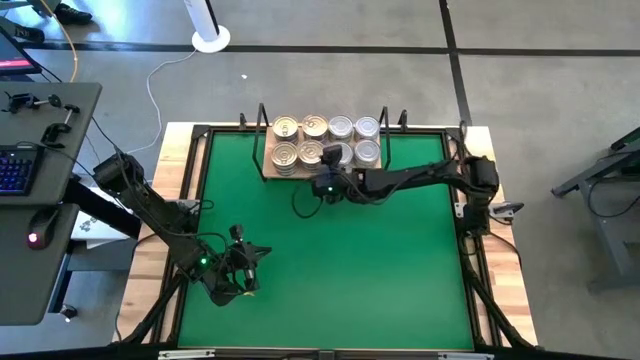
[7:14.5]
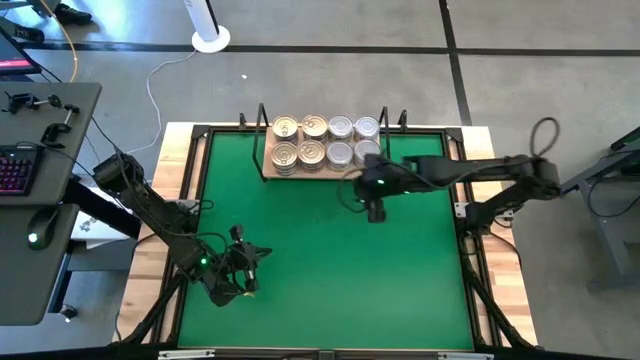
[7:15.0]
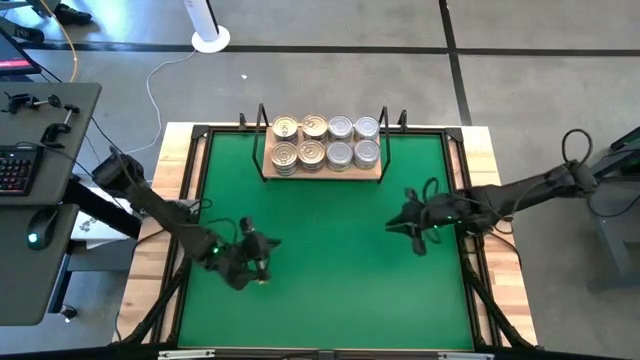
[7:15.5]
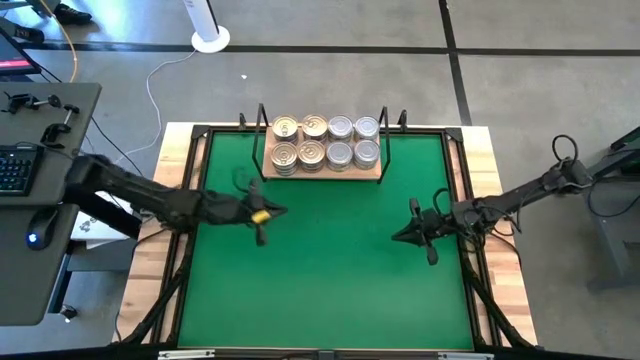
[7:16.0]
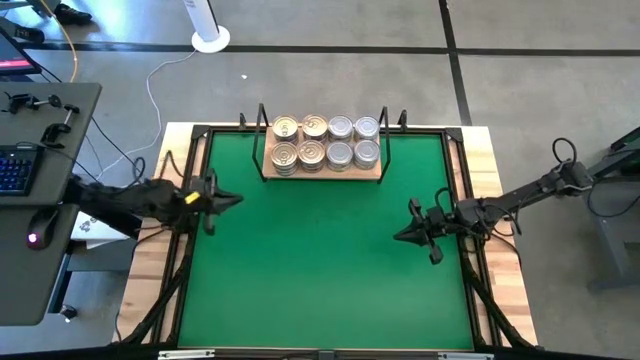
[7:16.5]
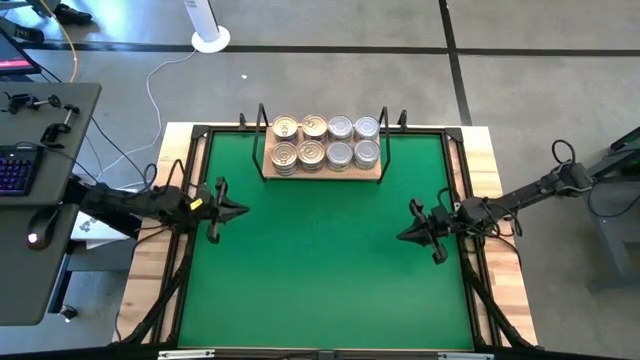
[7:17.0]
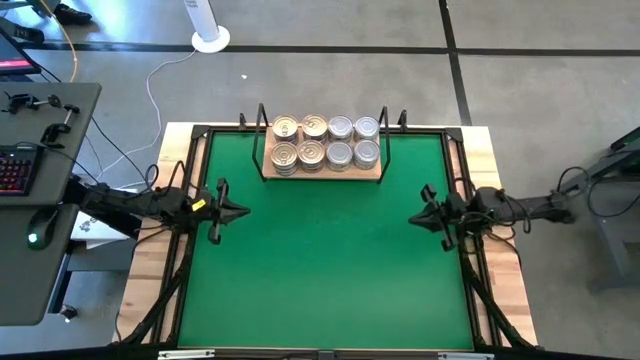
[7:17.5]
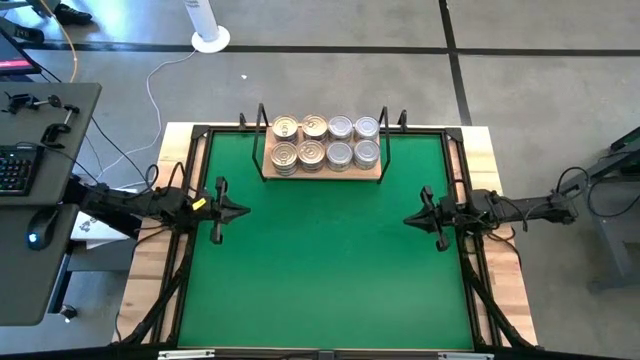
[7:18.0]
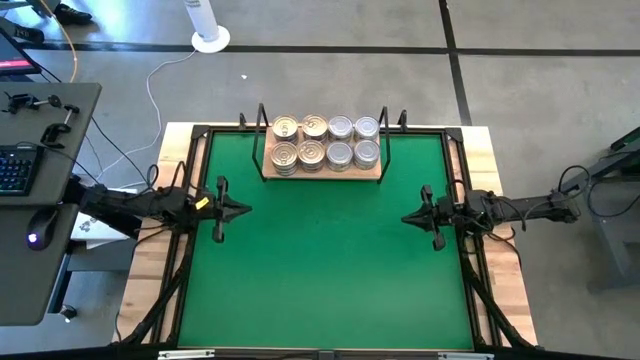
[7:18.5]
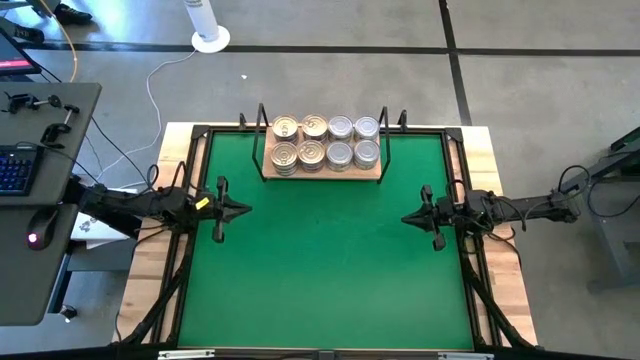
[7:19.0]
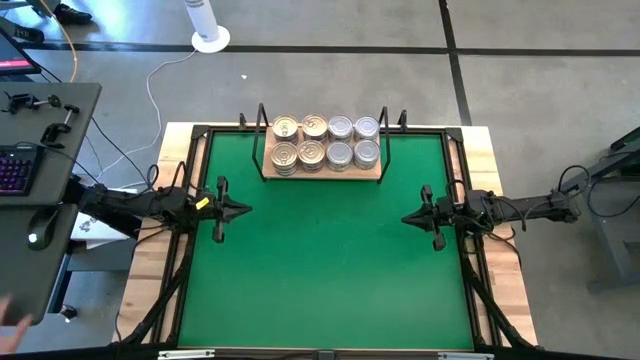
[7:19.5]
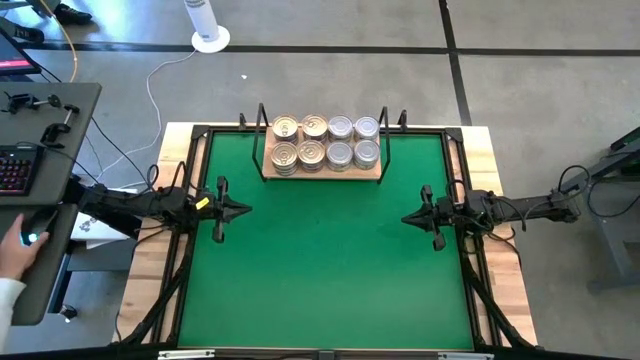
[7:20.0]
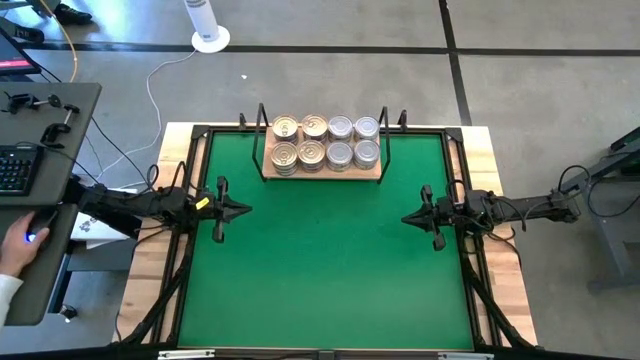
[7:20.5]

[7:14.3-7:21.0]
Task: Stack canned seafood by type on shelf
Return to Home Position

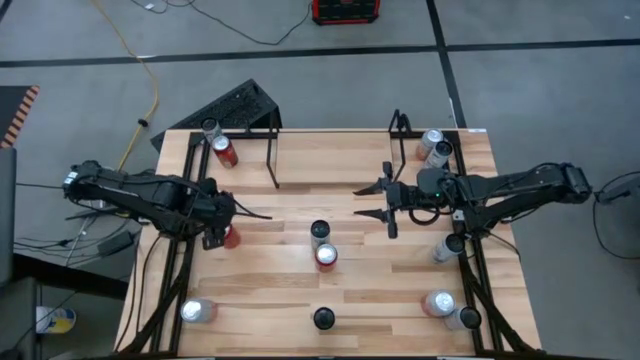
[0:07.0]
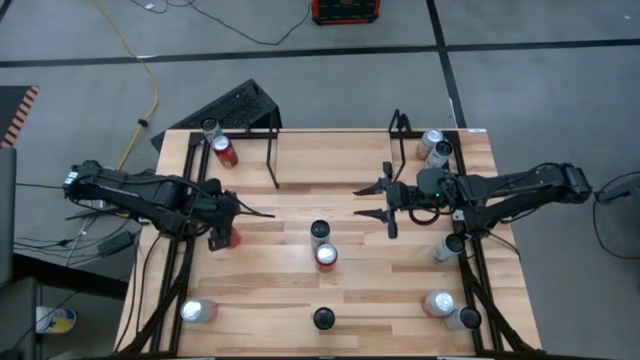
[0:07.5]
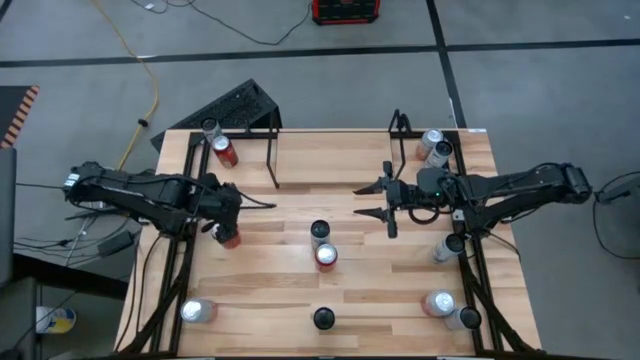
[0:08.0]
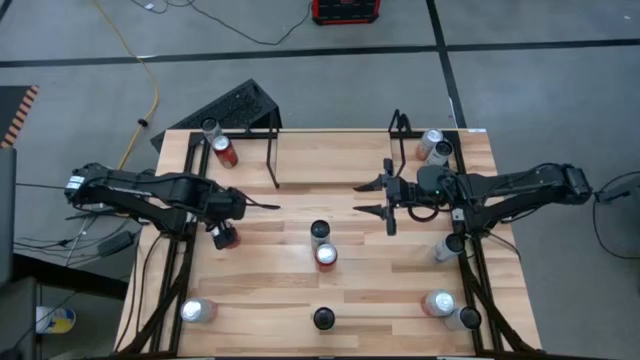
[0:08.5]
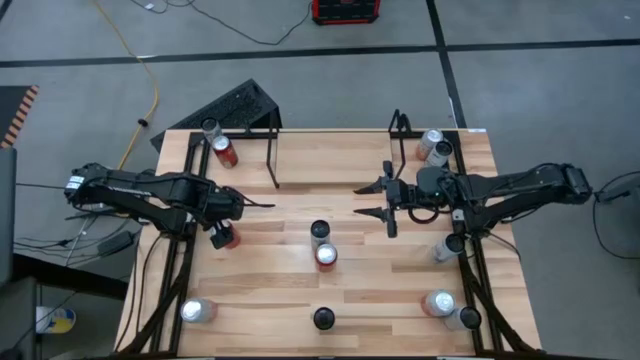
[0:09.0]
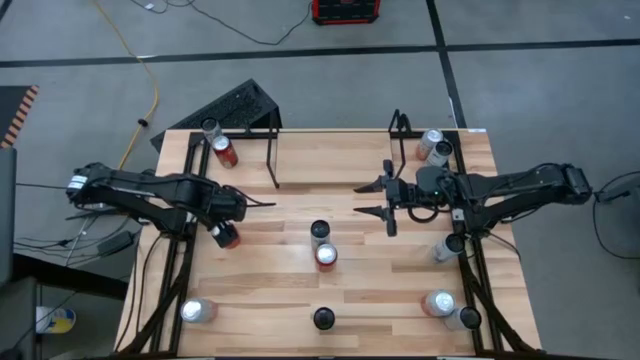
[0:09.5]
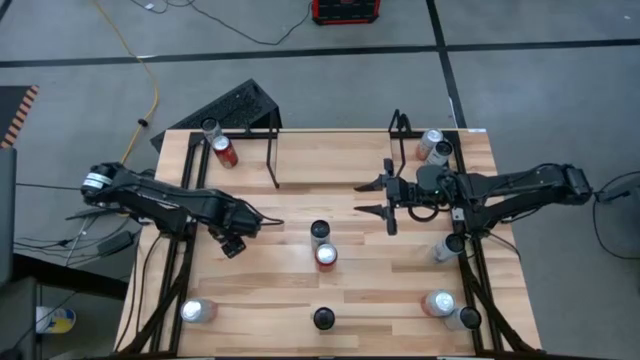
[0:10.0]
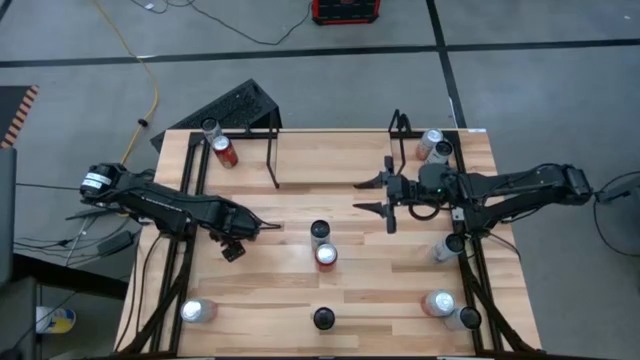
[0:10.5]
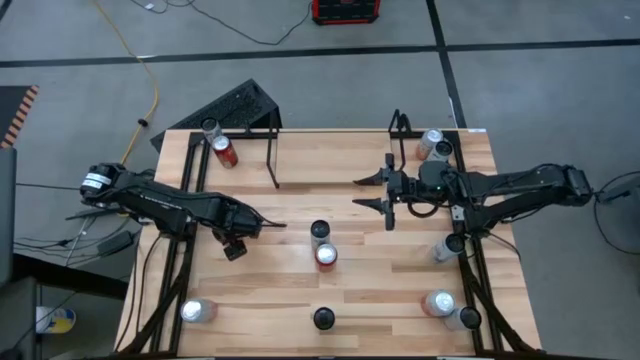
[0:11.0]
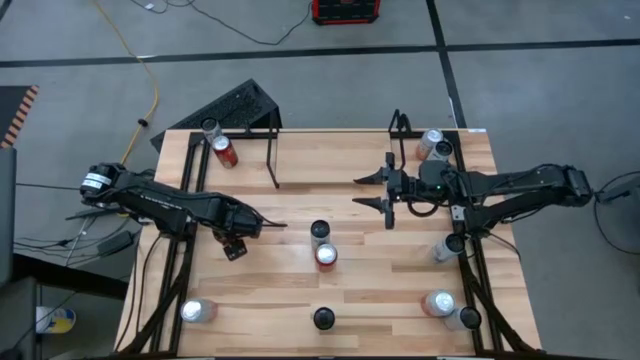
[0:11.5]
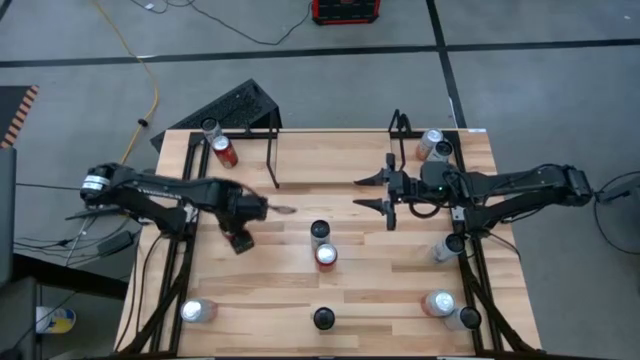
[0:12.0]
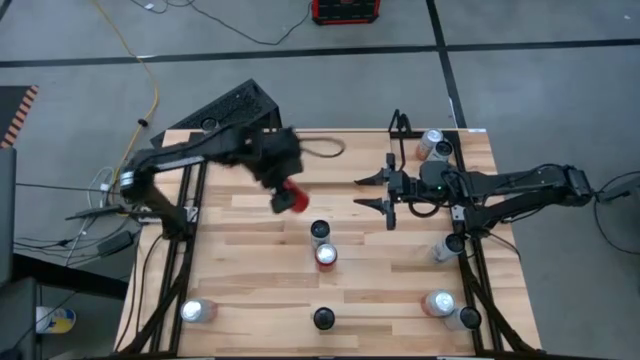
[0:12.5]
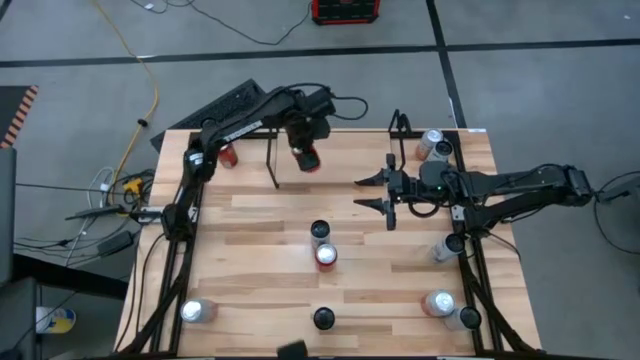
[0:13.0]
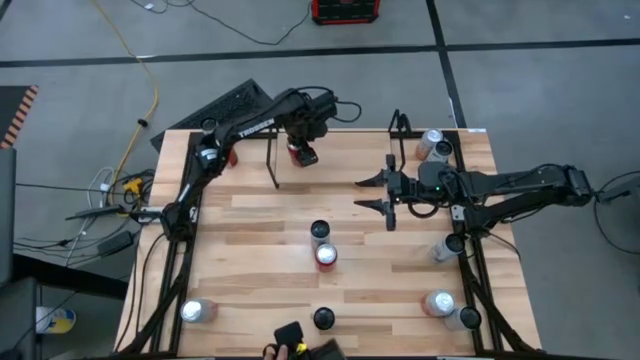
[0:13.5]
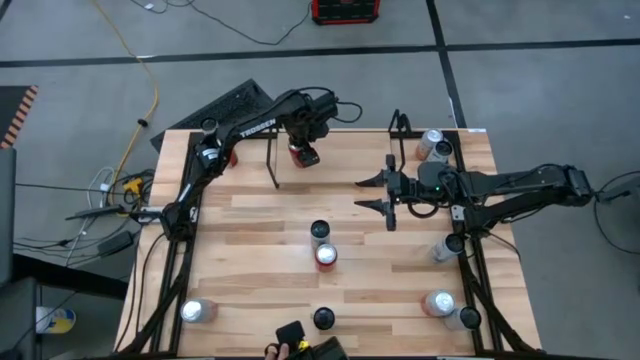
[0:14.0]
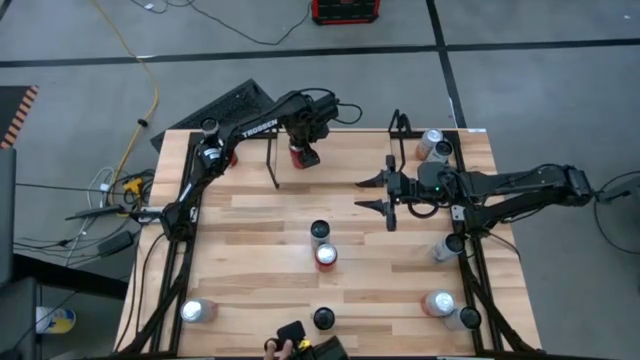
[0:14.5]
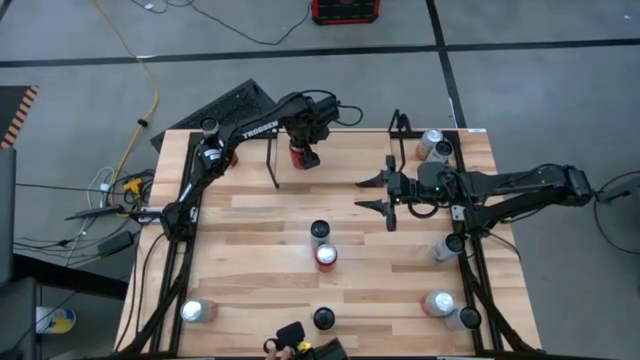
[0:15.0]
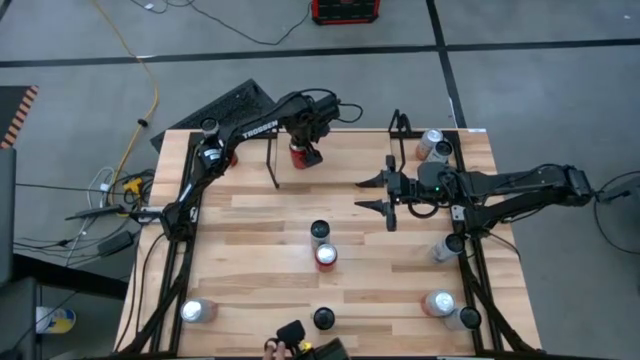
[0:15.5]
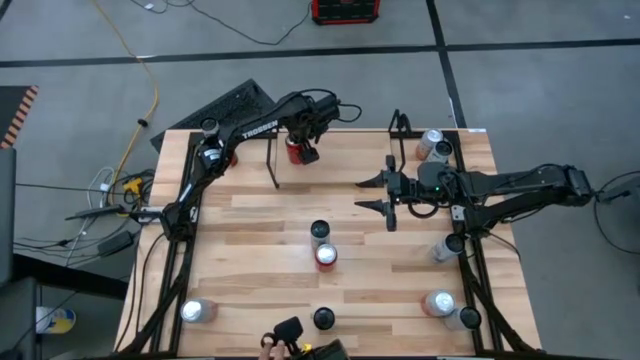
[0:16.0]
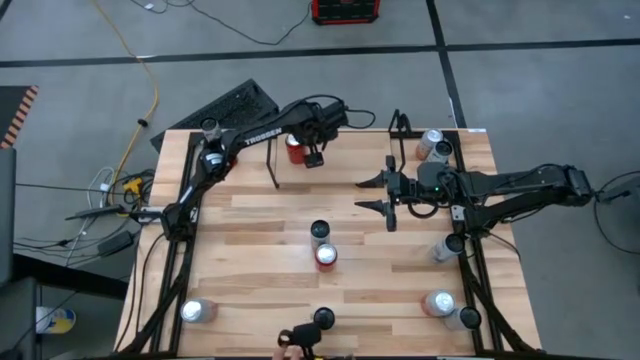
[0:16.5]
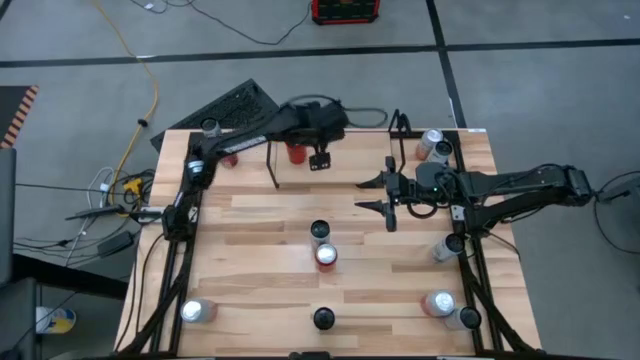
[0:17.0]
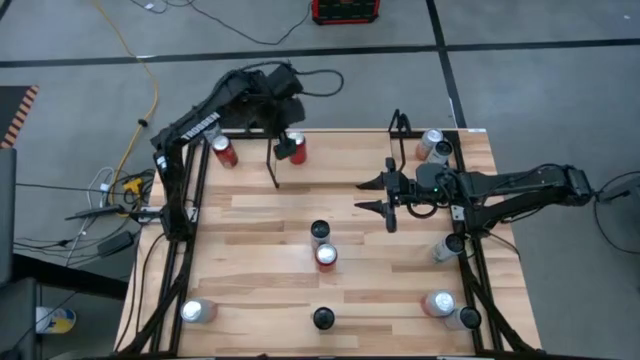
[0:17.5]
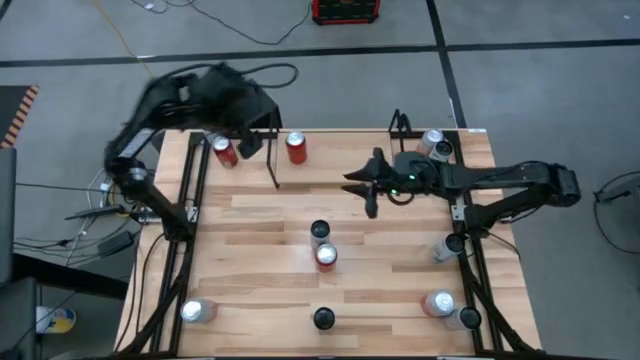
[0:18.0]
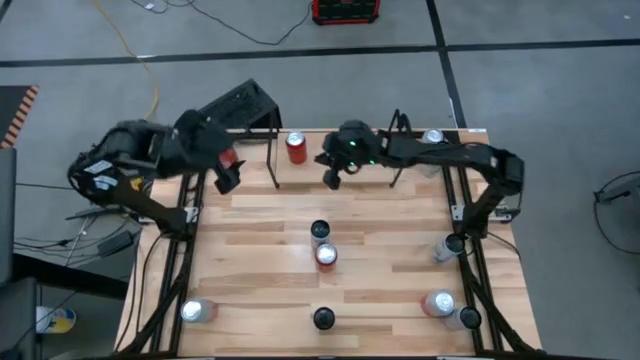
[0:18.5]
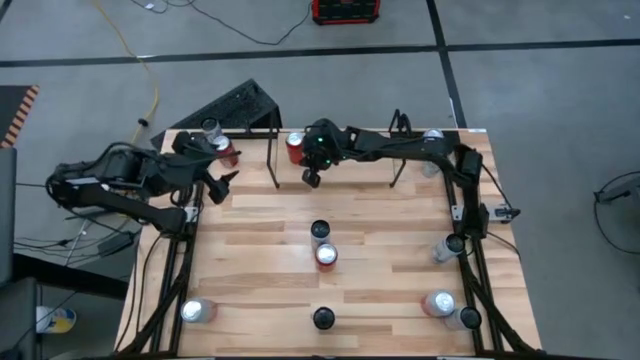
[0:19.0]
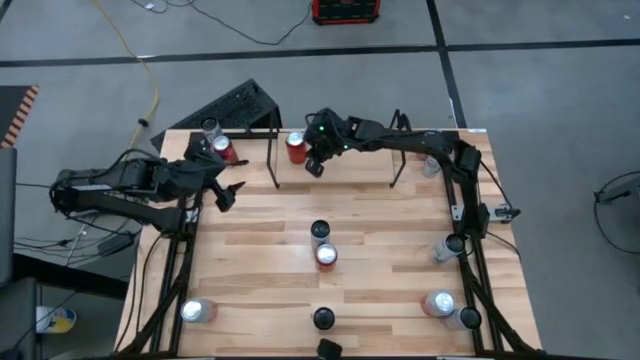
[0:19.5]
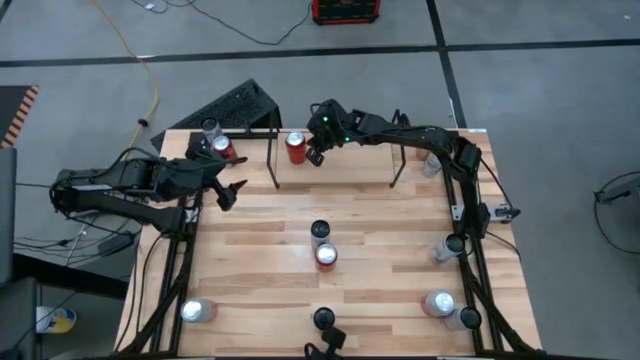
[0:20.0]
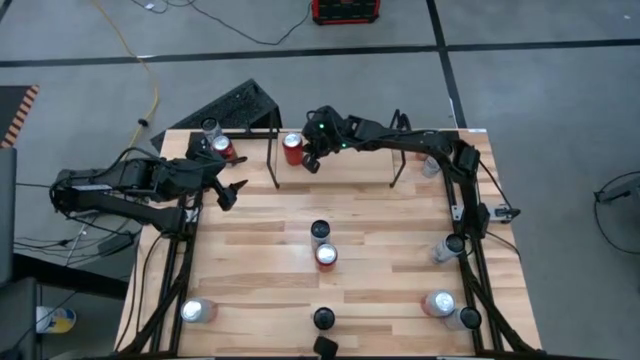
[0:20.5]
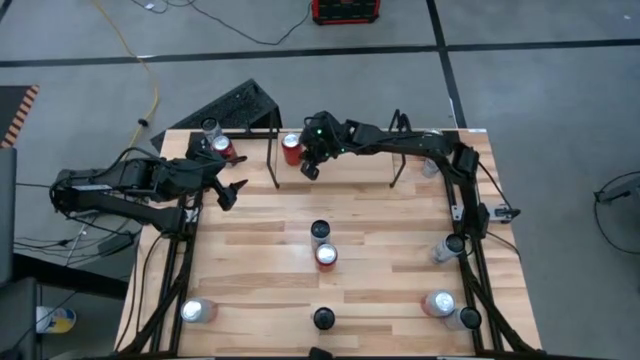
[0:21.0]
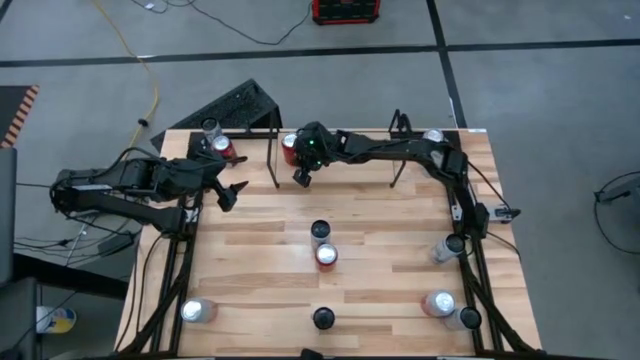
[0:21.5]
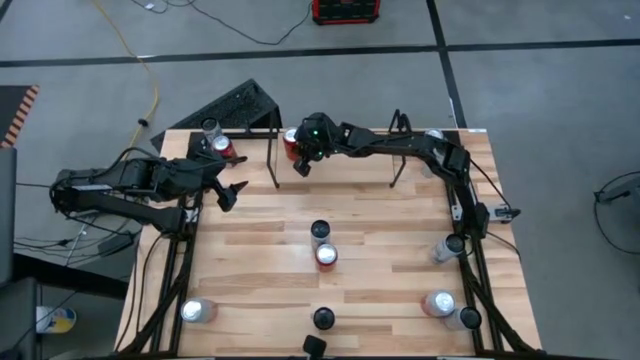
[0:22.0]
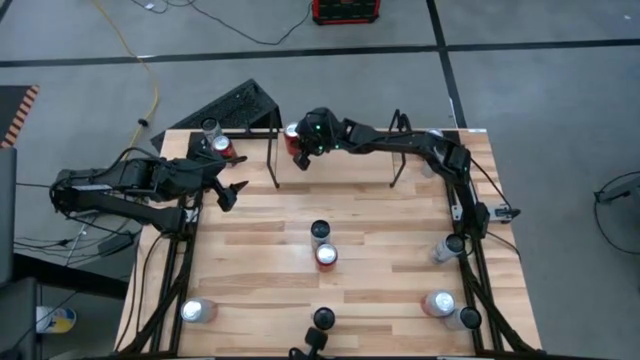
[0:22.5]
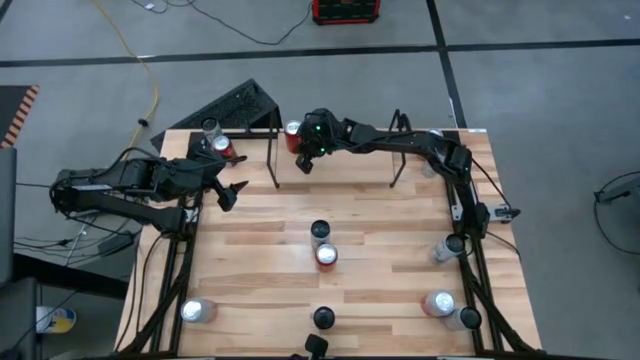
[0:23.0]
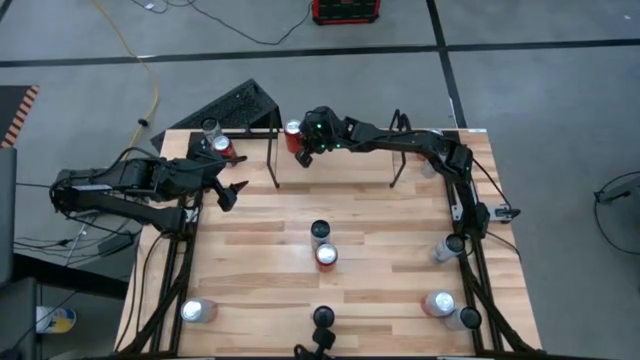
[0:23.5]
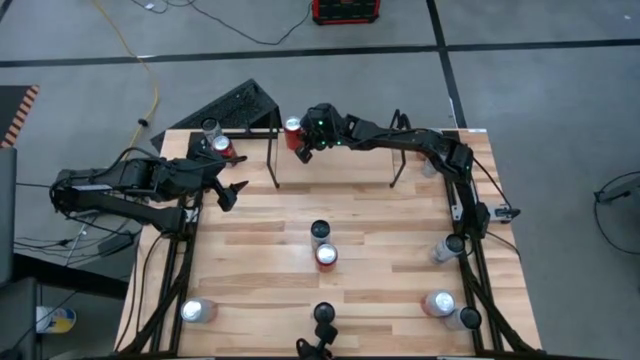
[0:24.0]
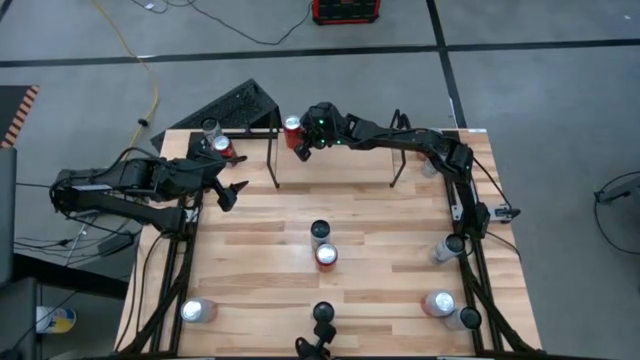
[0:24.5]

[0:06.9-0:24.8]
Task: Place canned beverage on shelf
Put the bottom left red black soda can on the shelf
